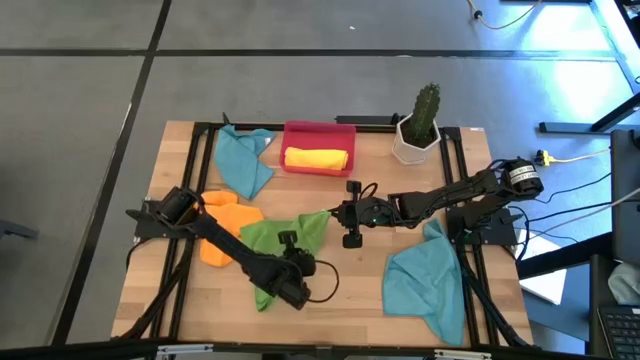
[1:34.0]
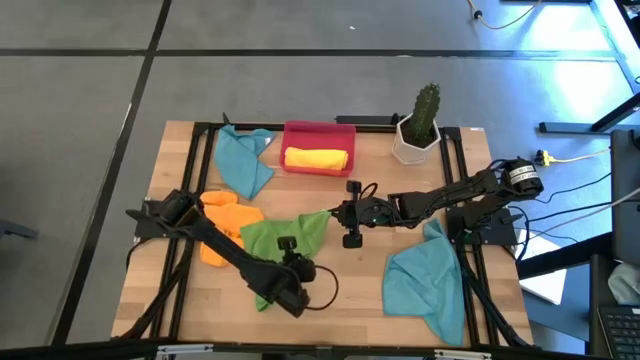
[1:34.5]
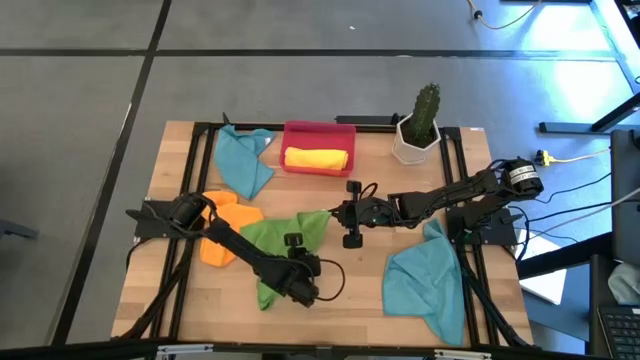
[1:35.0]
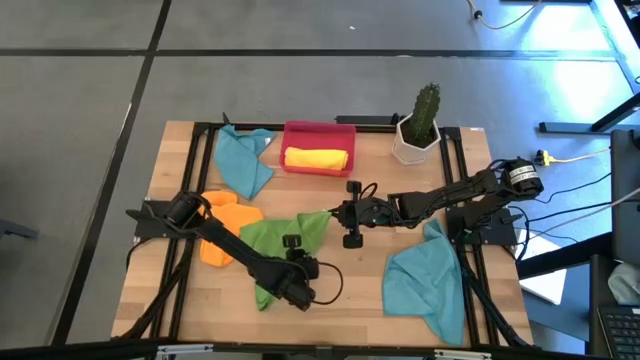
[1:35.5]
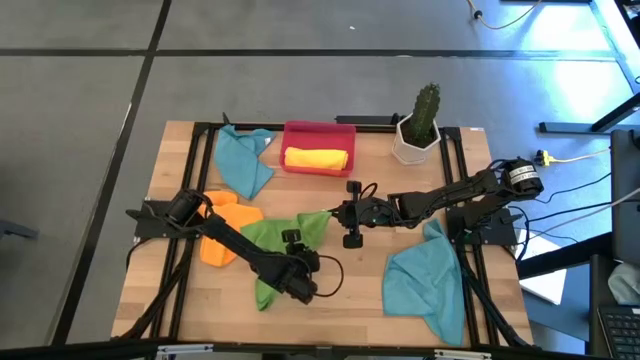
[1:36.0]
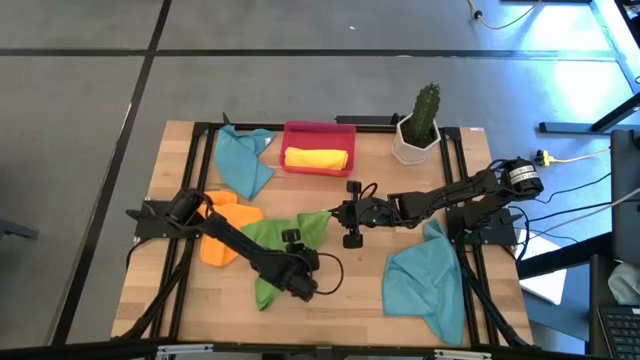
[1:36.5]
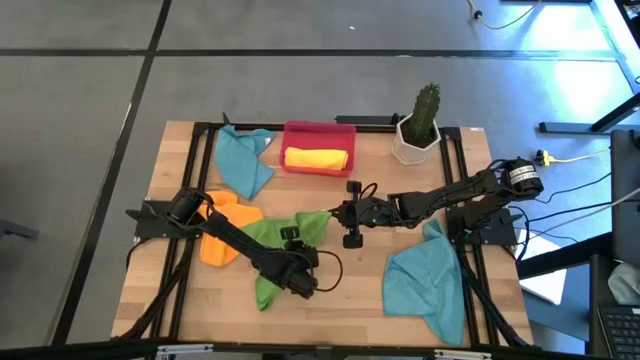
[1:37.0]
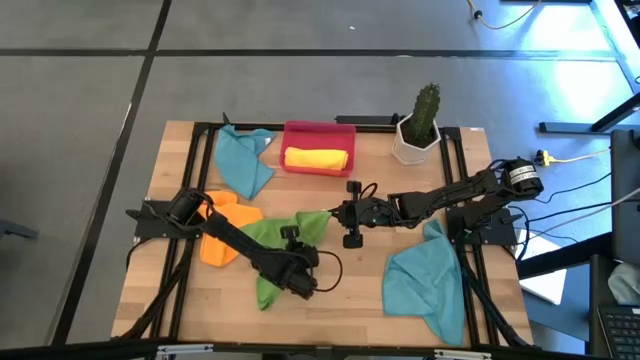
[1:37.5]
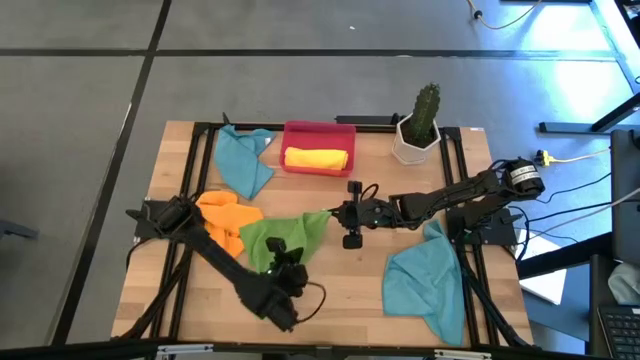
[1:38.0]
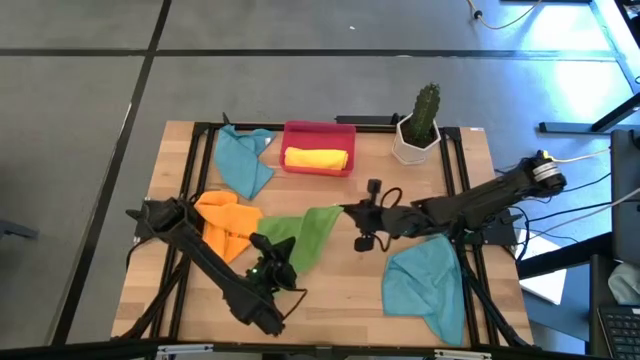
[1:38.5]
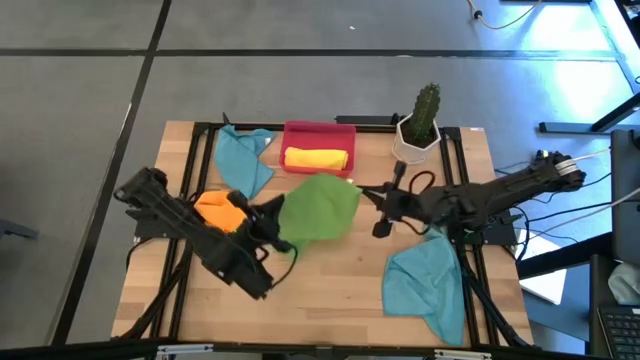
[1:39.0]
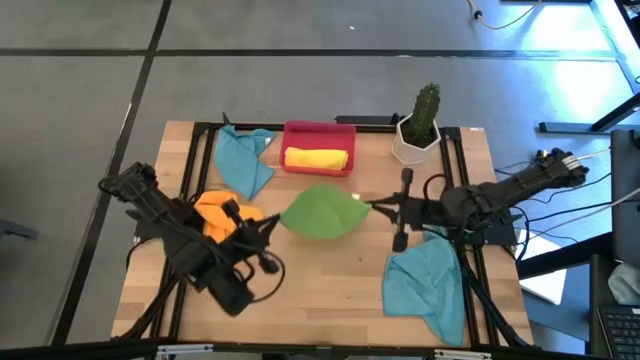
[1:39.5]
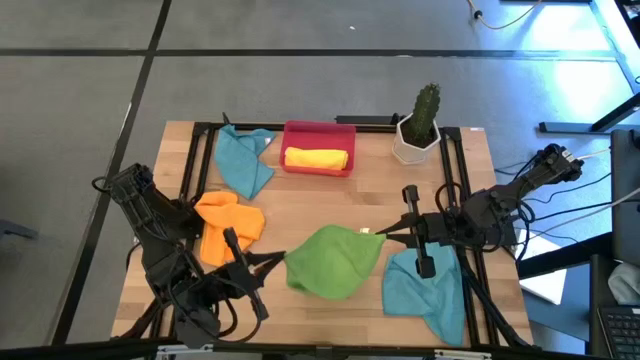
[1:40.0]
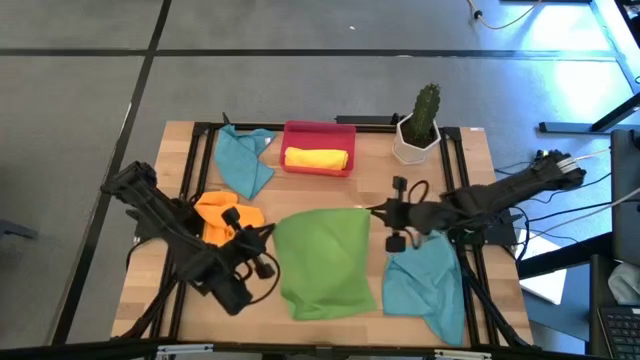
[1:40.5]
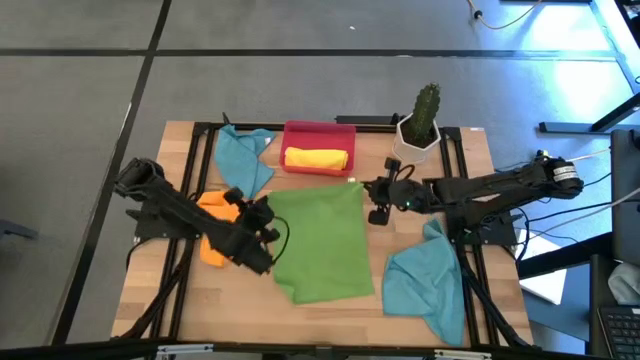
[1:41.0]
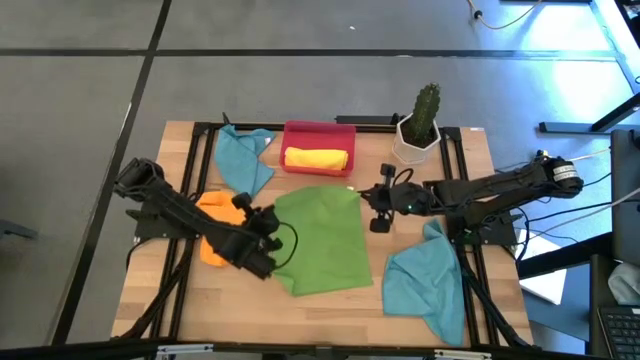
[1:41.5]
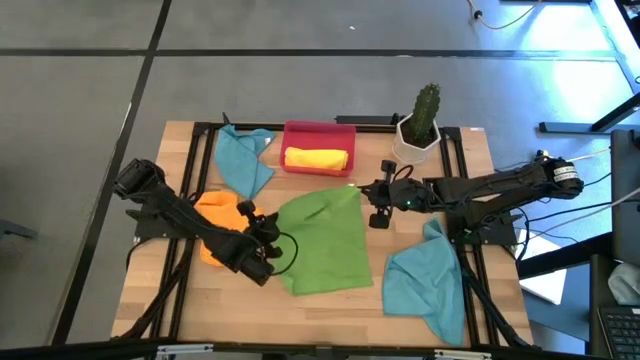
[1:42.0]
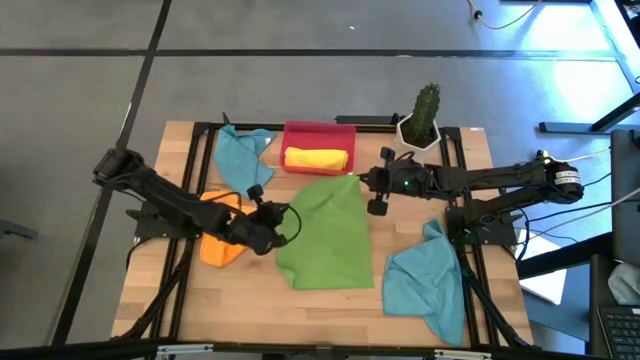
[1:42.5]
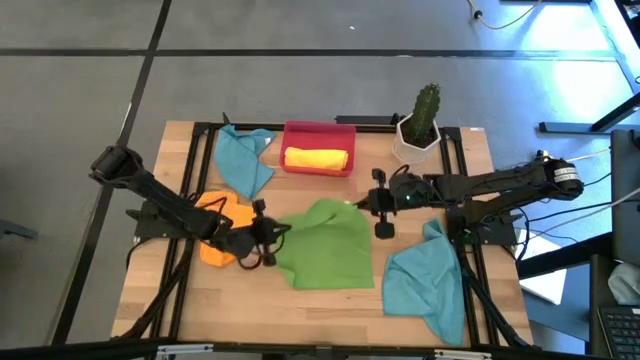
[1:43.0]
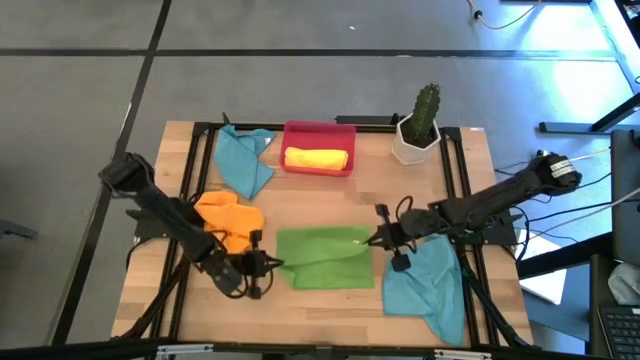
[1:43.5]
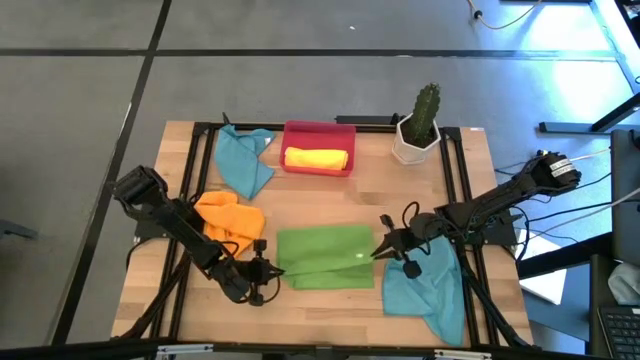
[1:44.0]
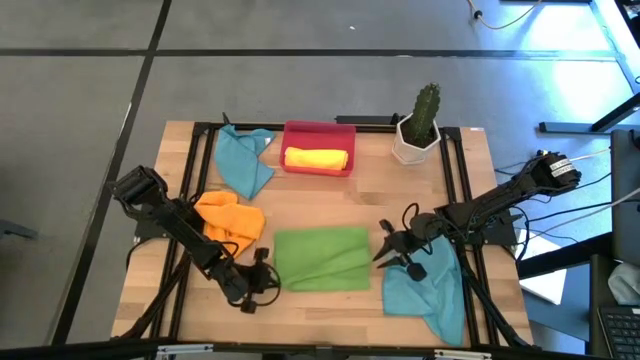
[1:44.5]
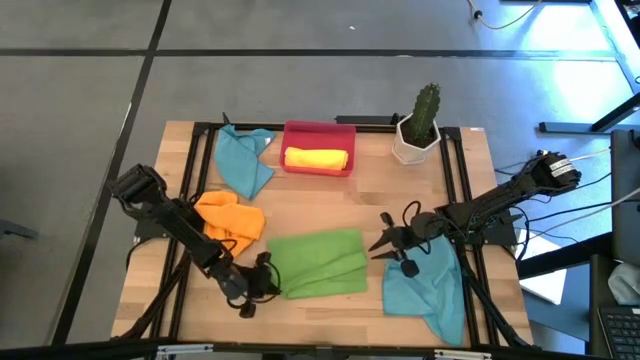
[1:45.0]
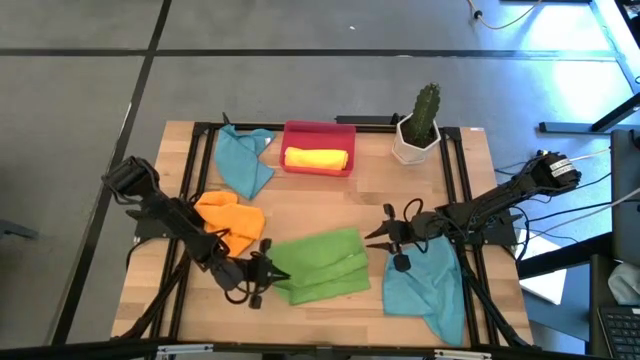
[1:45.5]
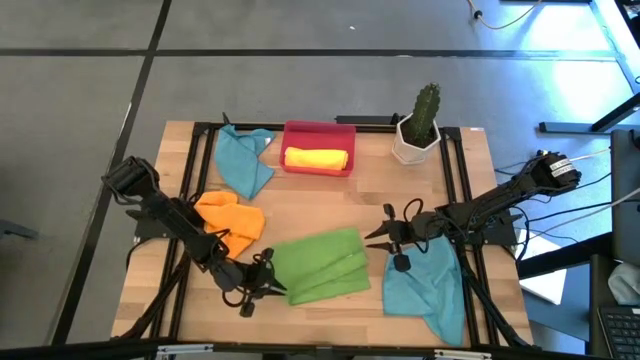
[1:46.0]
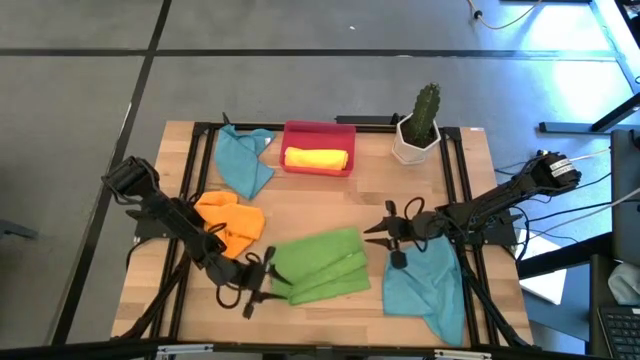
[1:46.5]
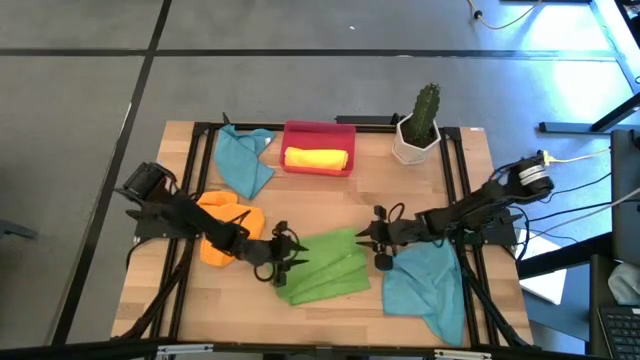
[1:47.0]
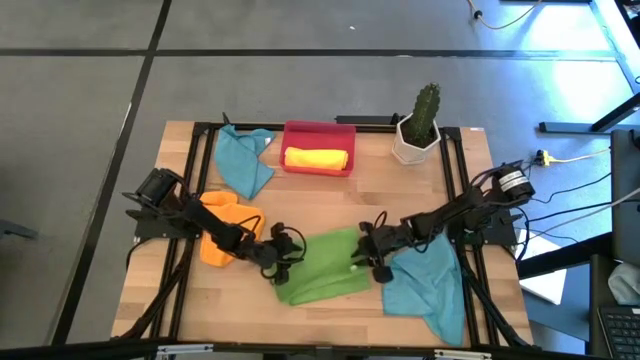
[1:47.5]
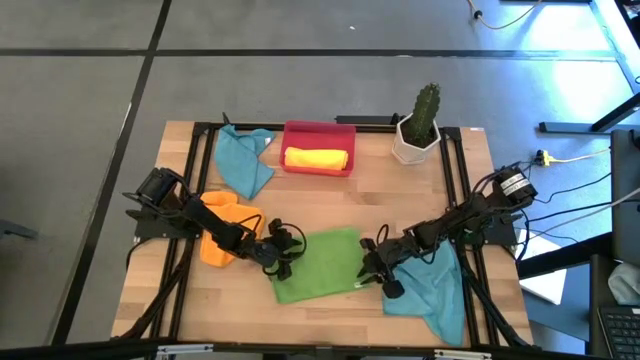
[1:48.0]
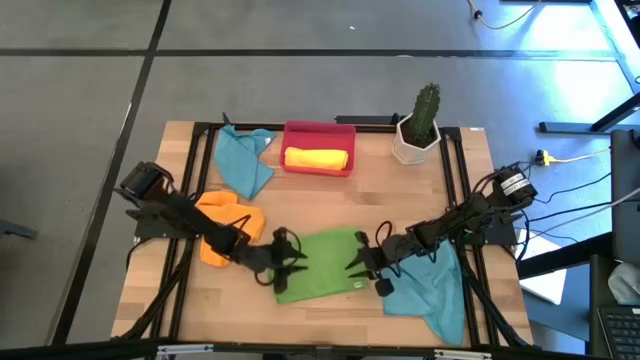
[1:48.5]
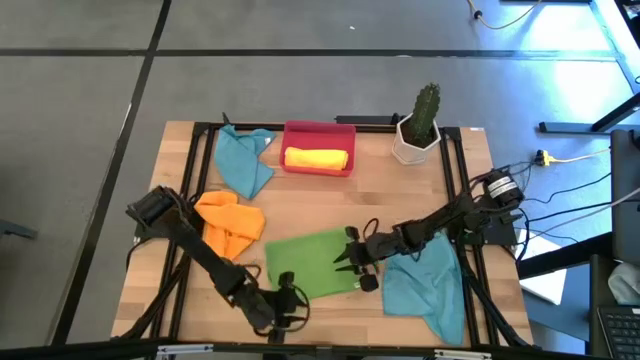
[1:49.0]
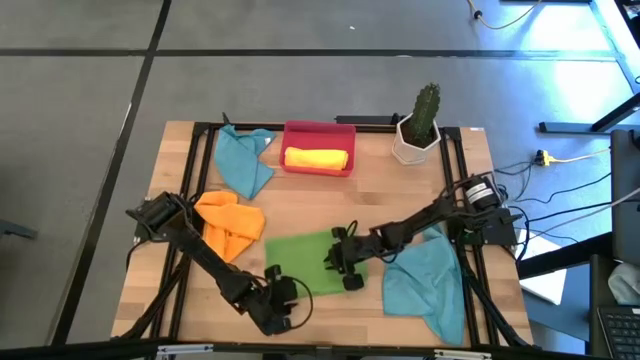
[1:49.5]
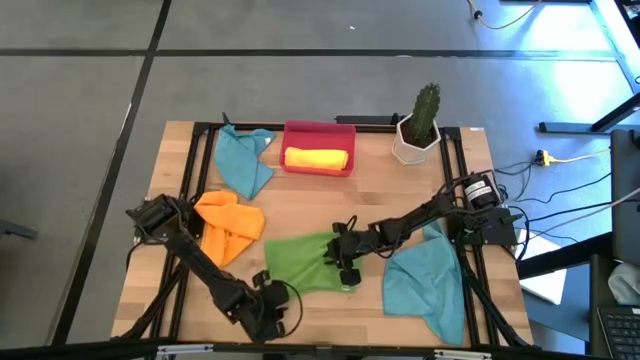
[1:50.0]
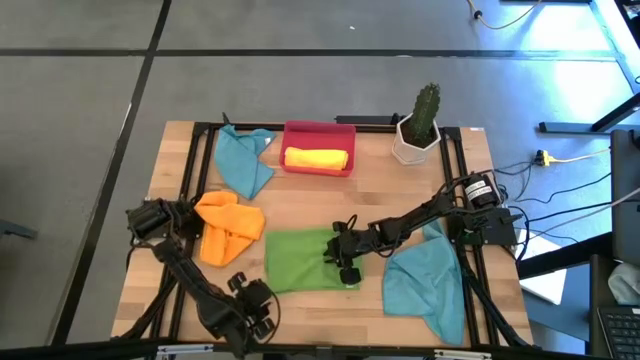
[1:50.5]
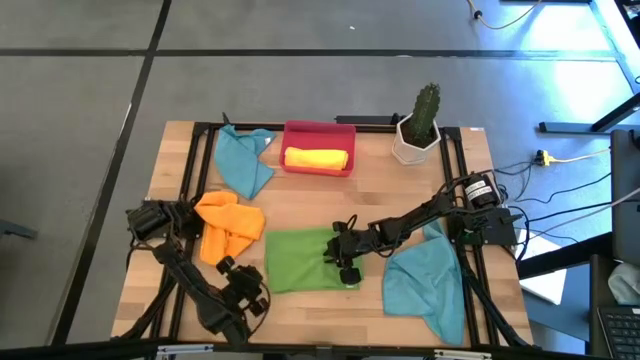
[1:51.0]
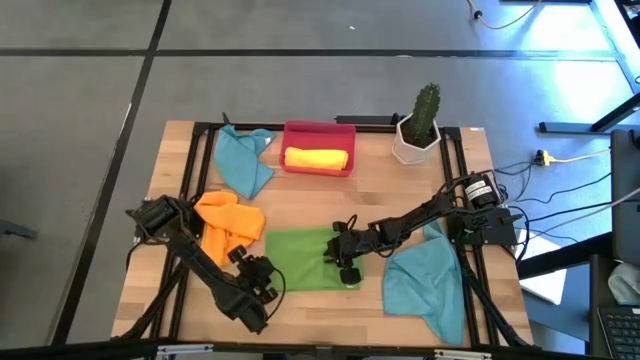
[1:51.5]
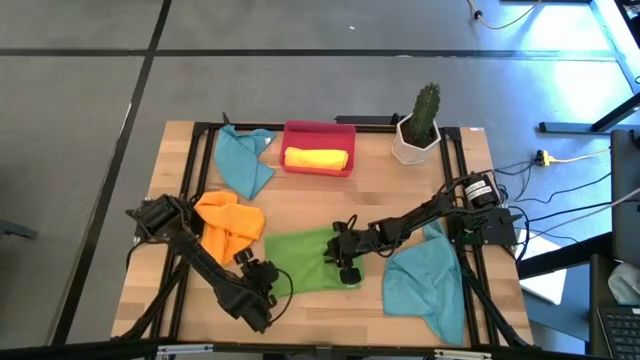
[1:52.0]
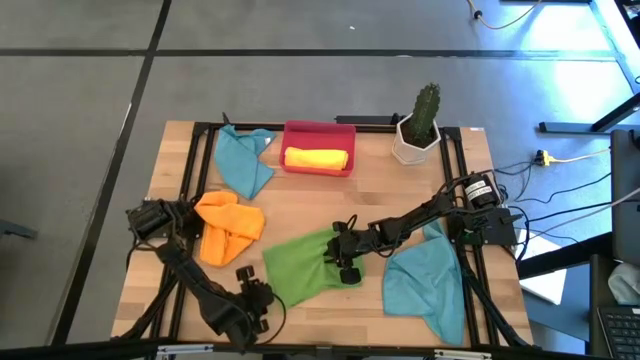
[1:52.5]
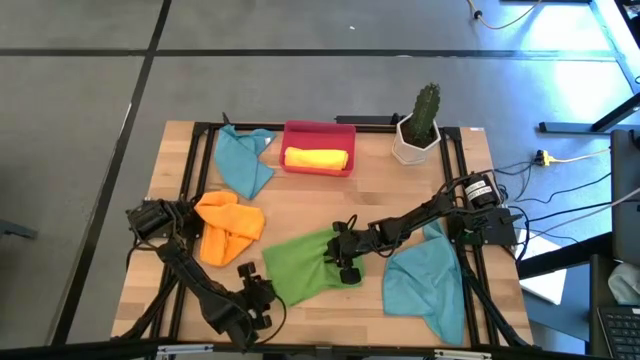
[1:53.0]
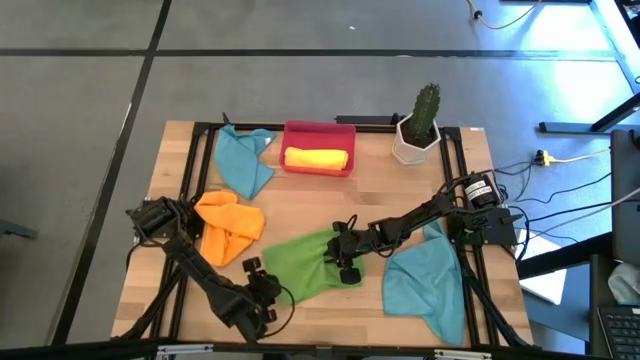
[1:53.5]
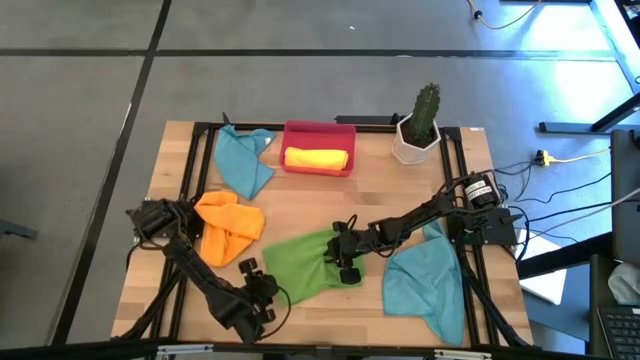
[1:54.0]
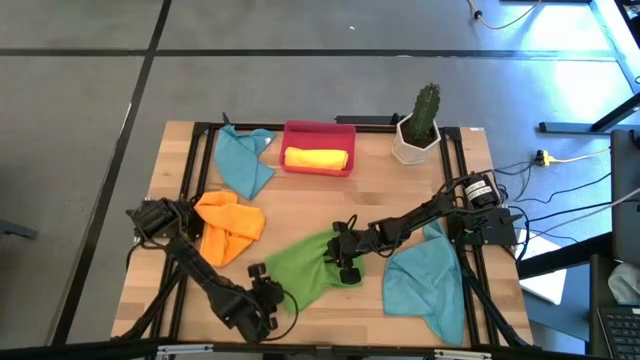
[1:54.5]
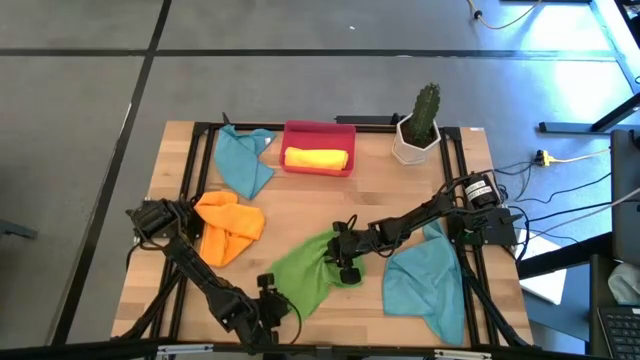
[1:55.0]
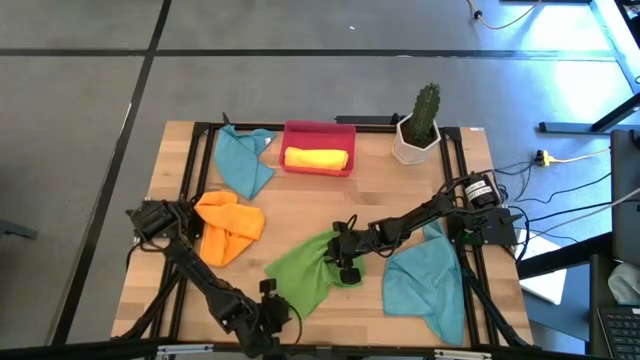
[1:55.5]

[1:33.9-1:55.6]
Task: Roll microfiber towels into tight, uniform cylinder then place into a basket
Roll the green towel
